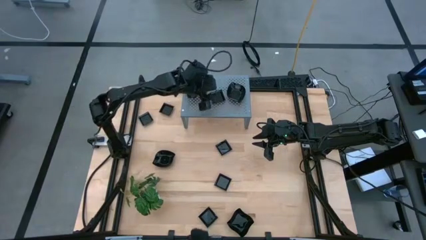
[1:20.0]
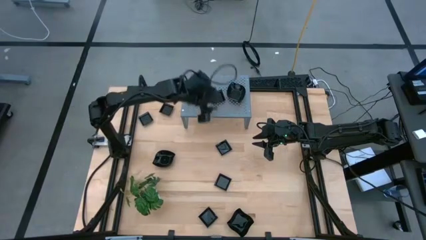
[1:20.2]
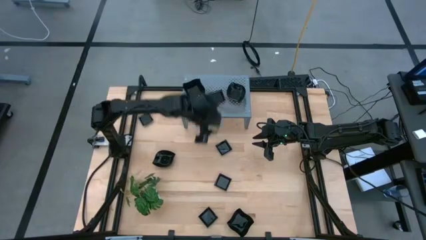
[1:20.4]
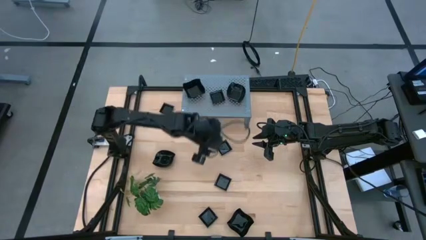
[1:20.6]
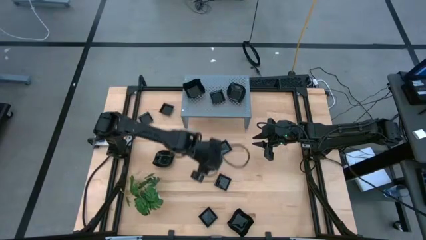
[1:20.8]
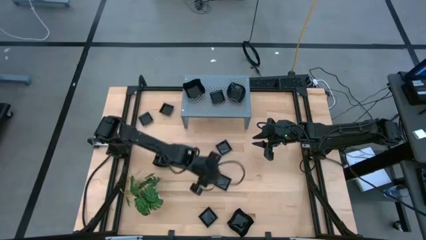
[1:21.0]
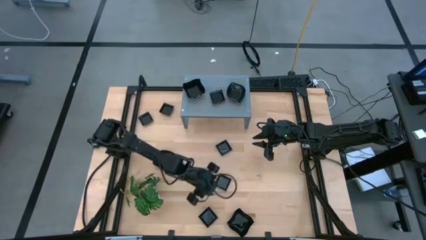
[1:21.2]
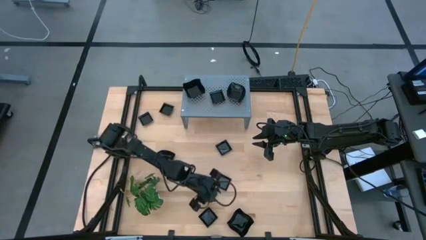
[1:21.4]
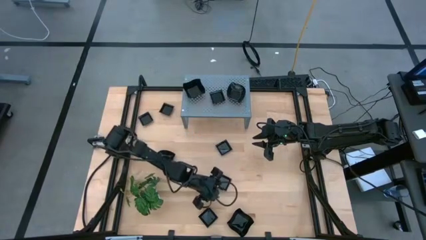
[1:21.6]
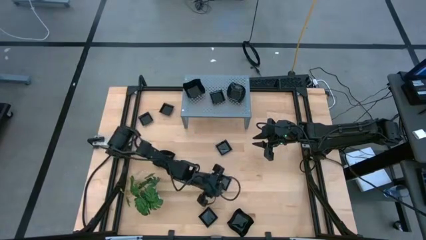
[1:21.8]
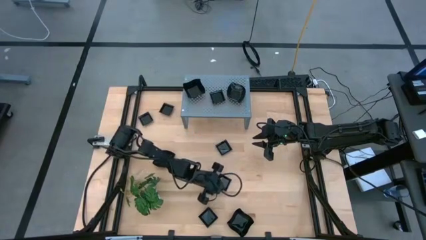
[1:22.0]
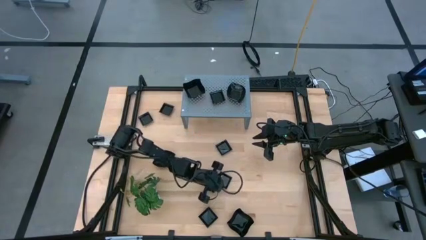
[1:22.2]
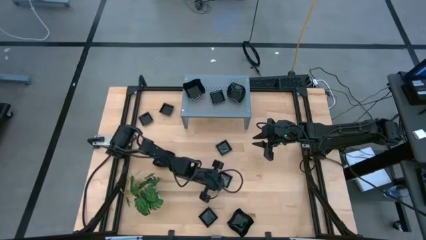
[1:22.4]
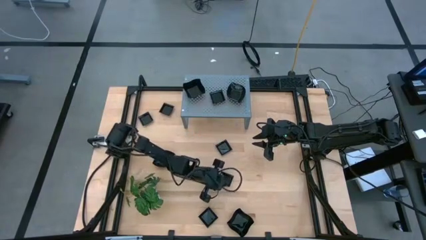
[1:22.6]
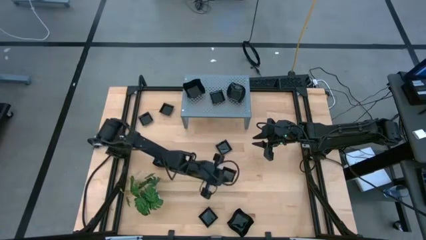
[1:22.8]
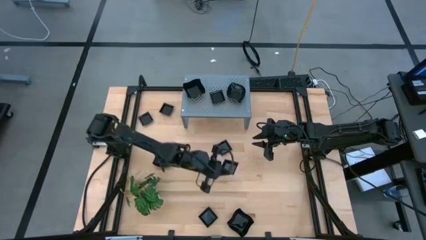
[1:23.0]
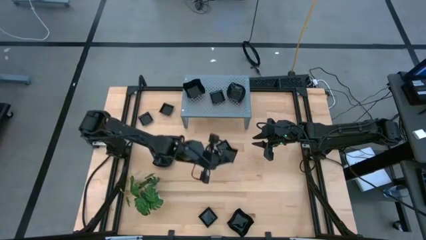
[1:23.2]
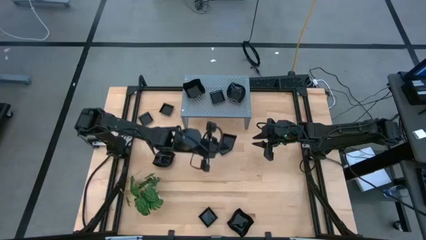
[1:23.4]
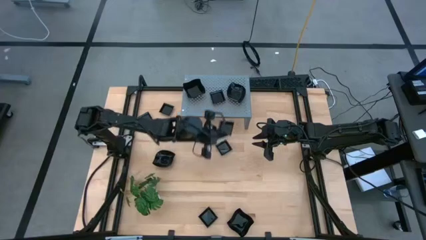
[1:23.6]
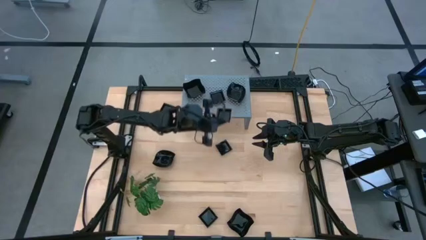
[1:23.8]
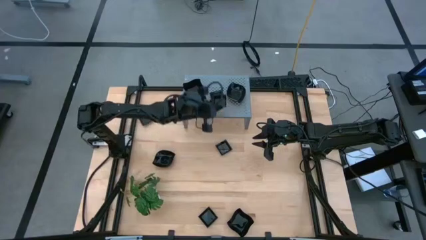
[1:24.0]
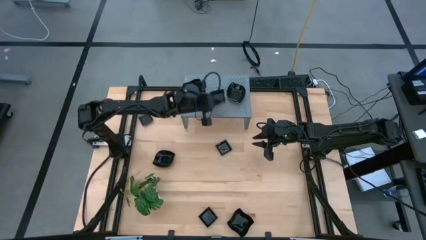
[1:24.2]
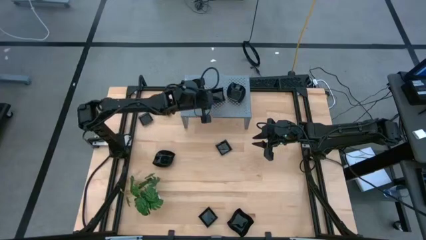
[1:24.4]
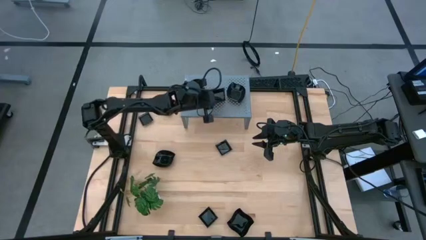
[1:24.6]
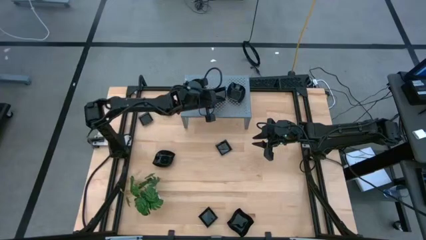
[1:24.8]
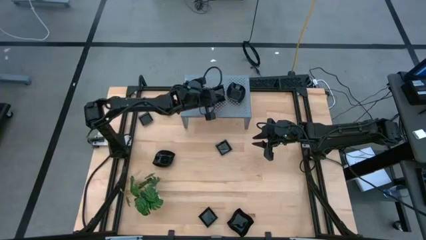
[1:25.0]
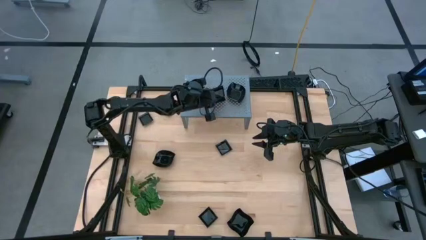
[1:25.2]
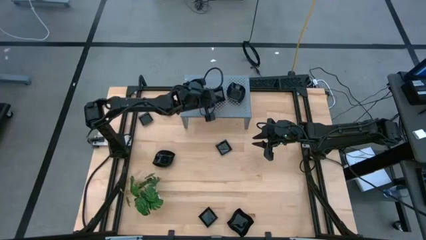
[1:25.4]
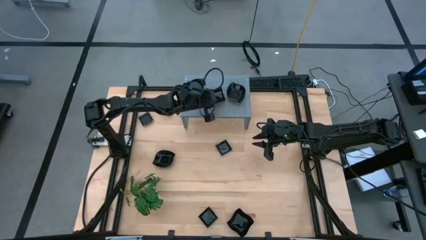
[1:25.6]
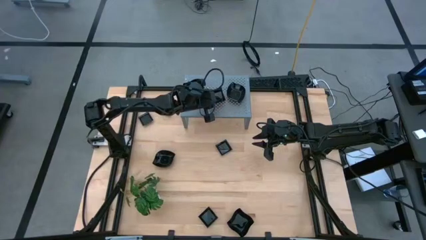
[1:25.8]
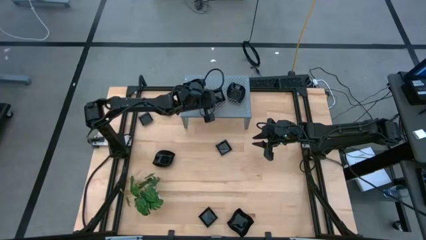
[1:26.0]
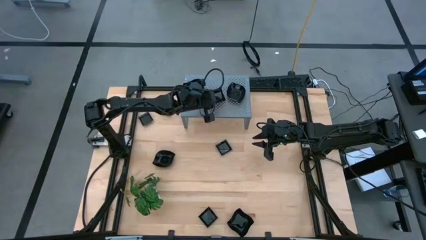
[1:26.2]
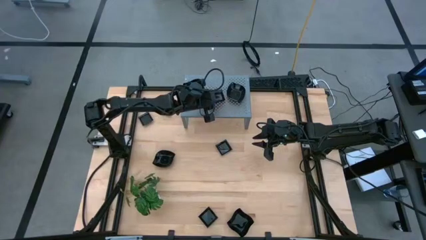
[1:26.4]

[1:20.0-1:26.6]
Task: Pick & Place Mini shaped plates
Stack the black square plate on top of the black square plate on the shelf

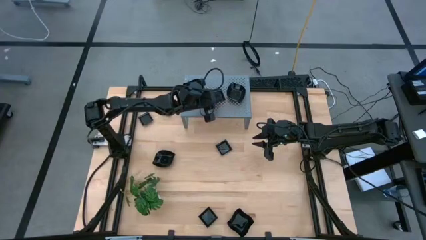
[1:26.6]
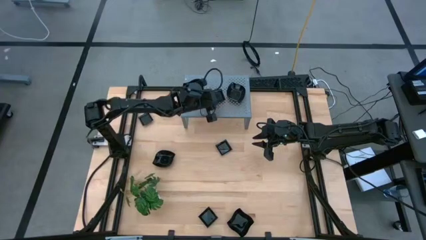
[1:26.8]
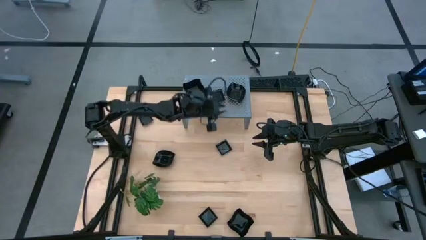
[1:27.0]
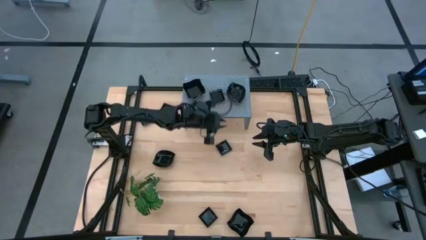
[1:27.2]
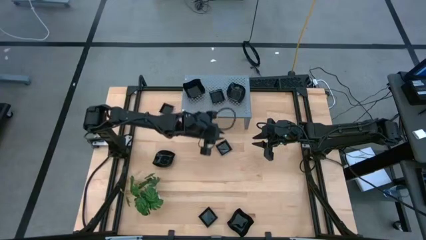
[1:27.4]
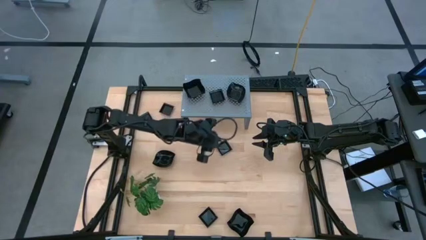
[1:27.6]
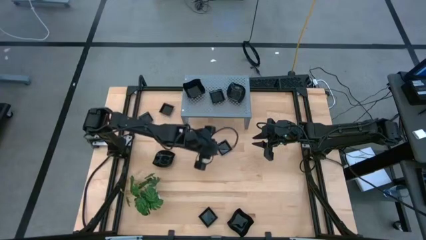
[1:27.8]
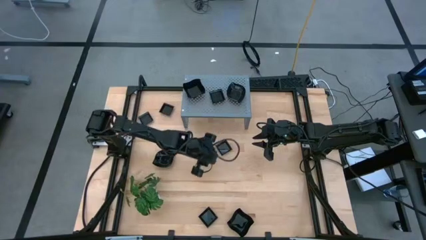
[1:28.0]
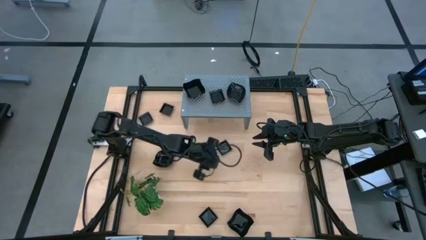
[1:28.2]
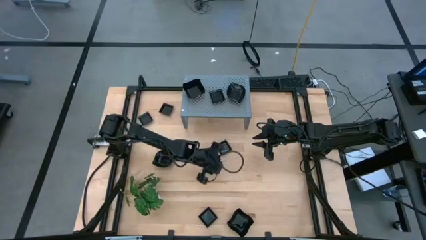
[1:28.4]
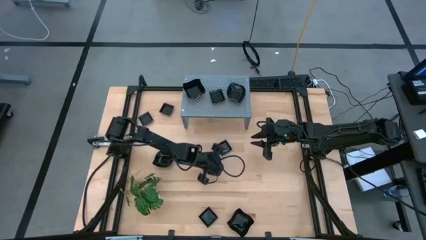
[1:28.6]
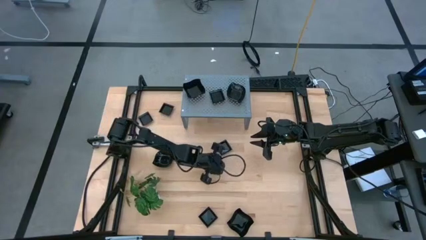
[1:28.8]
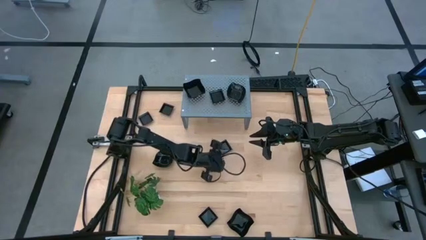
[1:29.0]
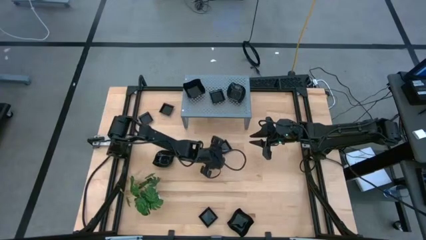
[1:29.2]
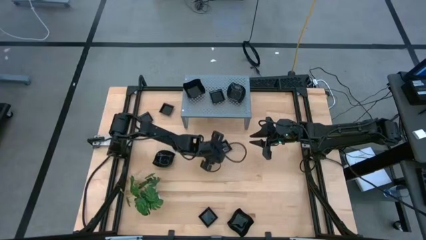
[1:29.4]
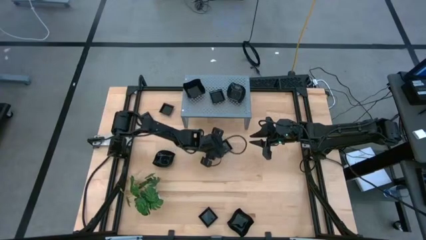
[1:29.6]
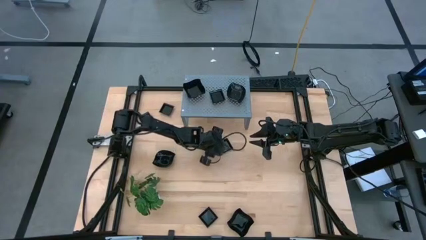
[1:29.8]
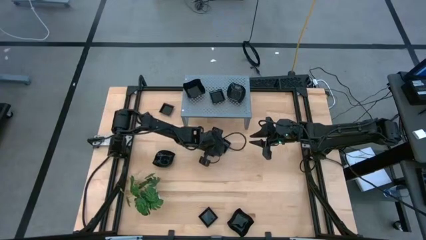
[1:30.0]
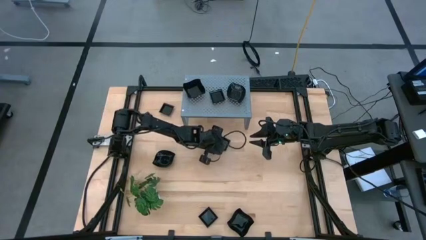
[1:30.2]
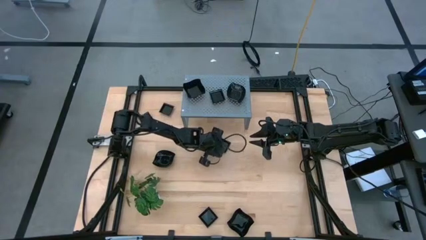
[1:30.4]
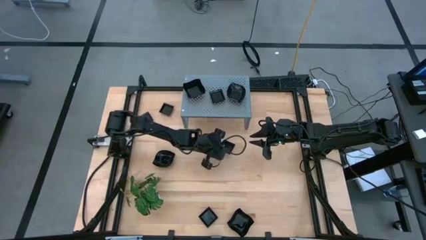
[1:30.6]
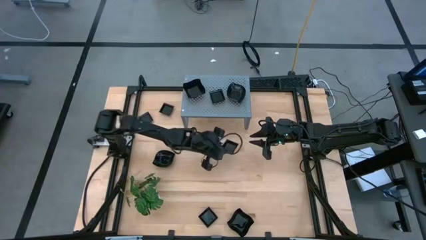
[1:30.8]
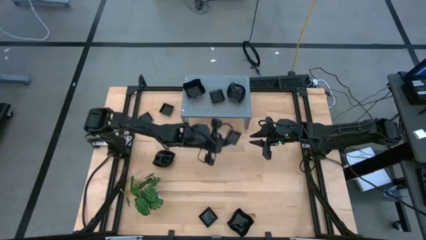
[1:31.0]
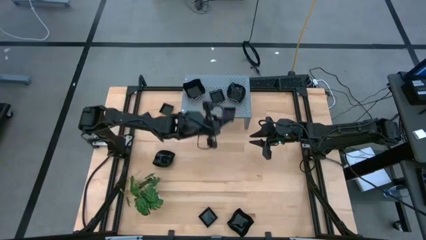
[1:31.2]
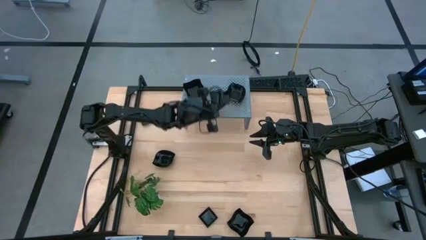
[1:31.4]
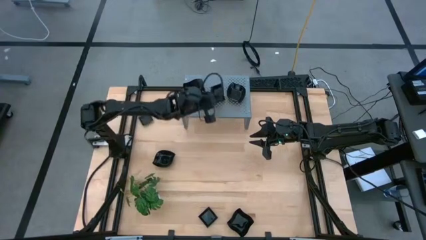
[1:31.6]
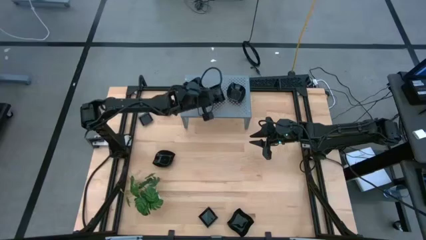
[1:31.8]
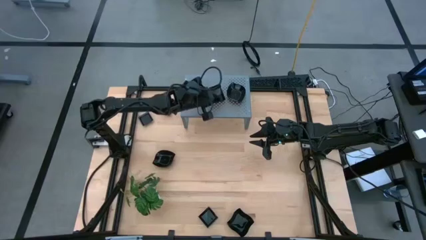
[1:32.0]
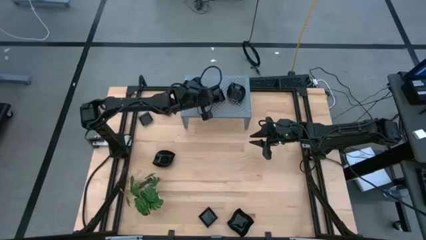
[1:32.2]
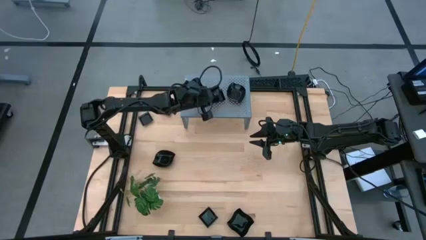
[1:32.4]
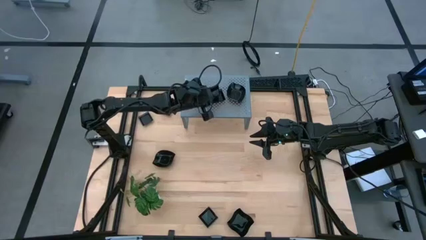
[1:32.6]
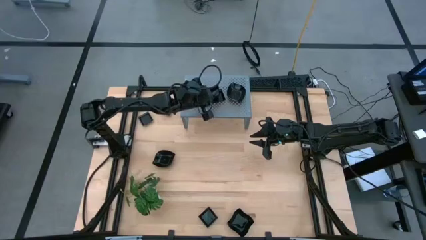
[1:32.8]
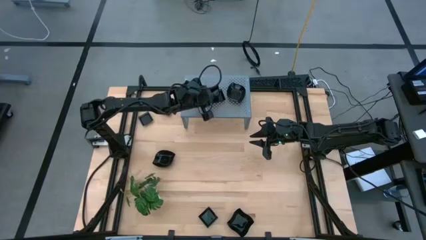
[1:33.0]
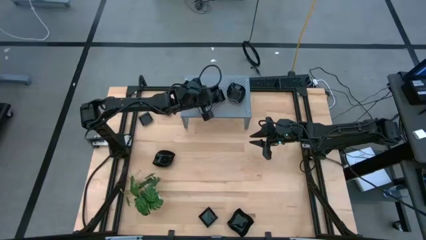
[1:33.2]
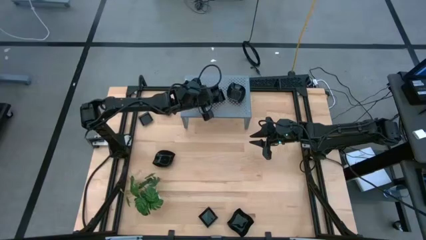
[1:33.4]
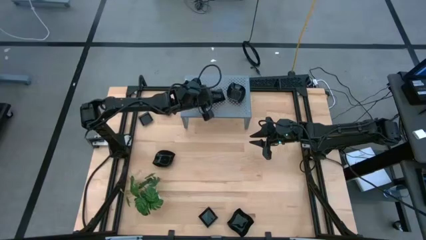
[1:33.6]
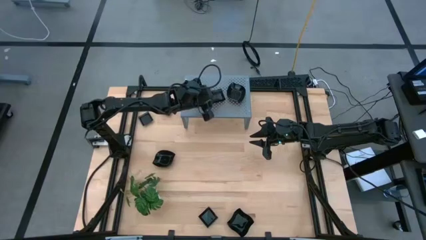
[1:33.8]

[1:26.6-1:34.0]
Stack the black square plate on top of the black square plates on the shelf
